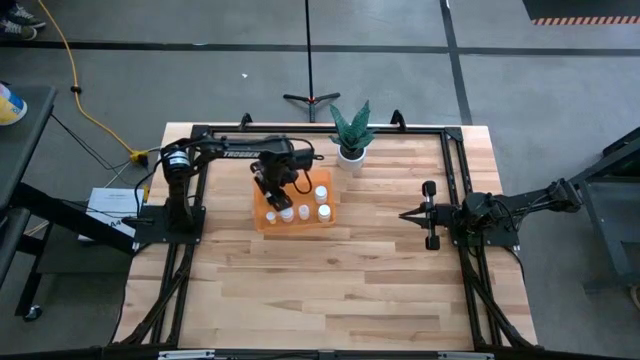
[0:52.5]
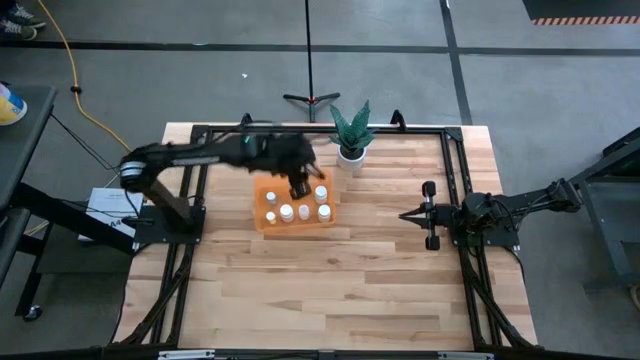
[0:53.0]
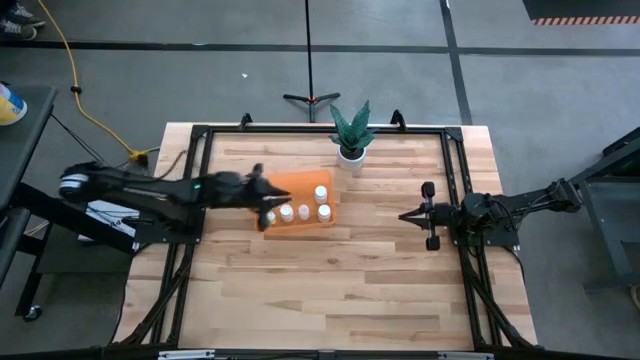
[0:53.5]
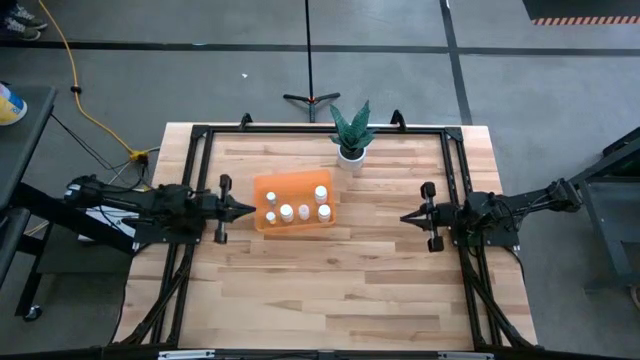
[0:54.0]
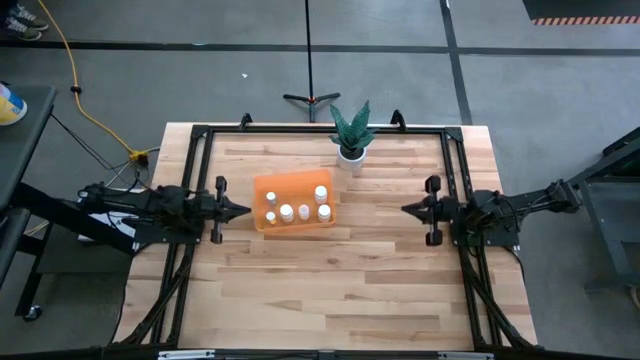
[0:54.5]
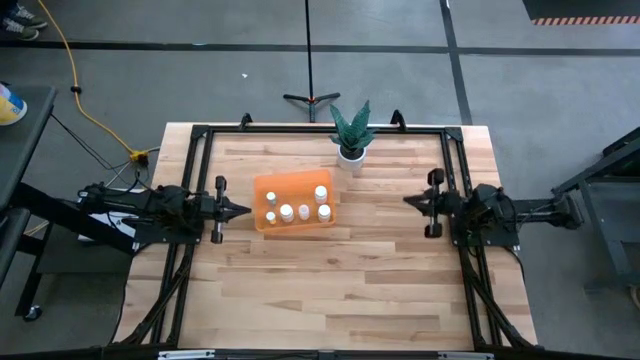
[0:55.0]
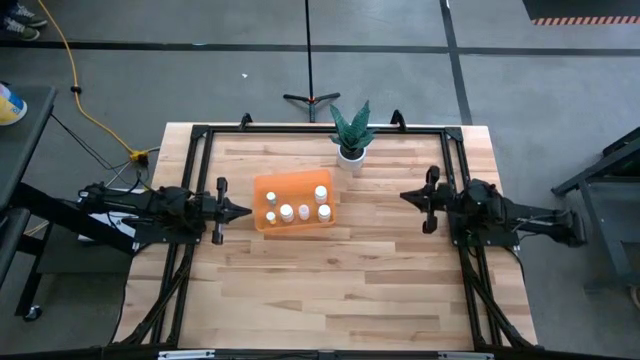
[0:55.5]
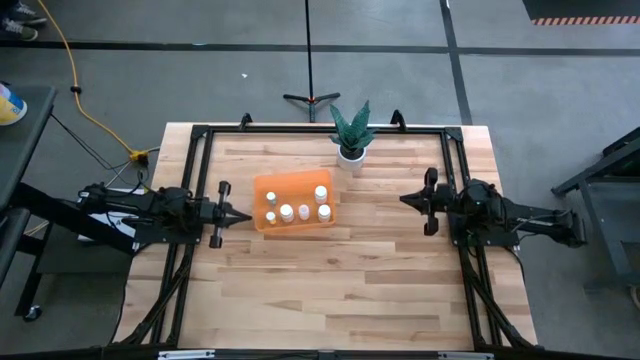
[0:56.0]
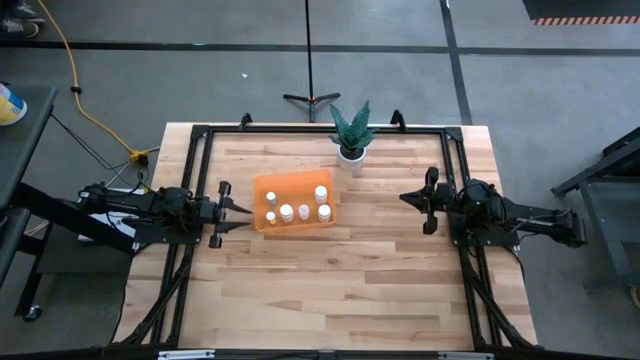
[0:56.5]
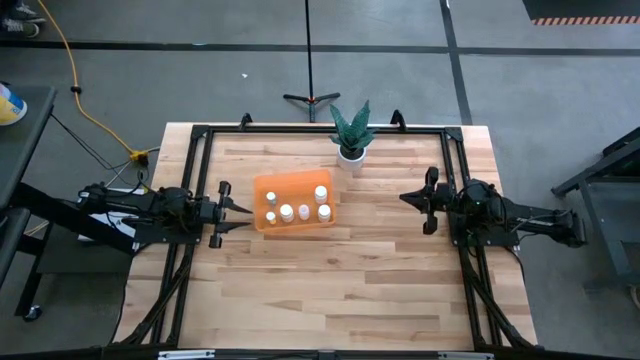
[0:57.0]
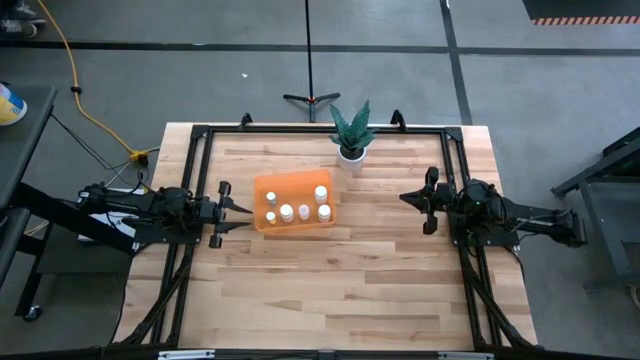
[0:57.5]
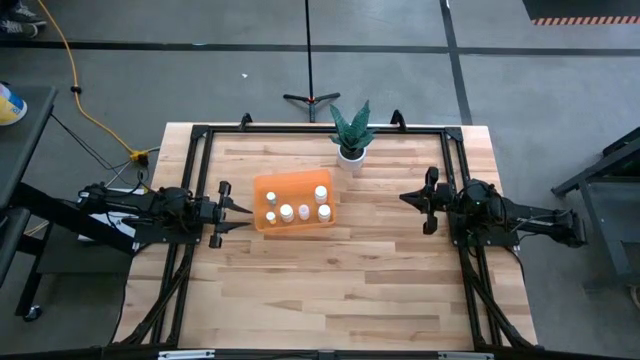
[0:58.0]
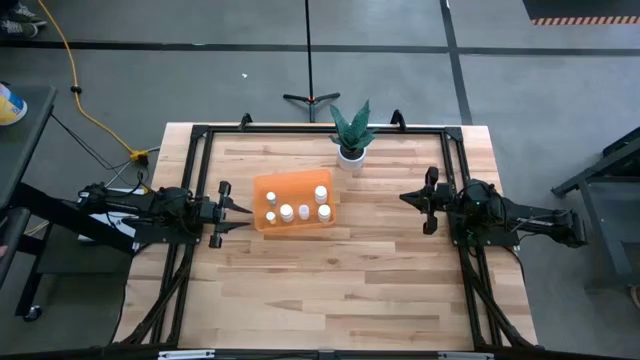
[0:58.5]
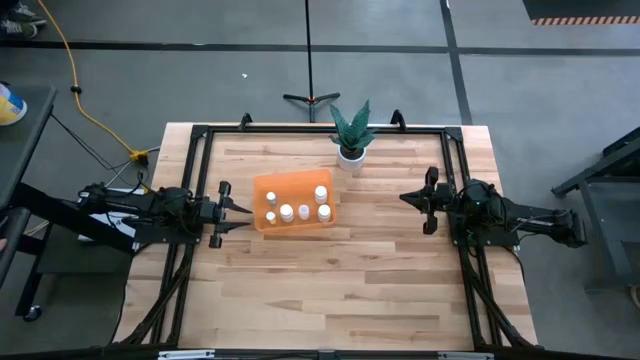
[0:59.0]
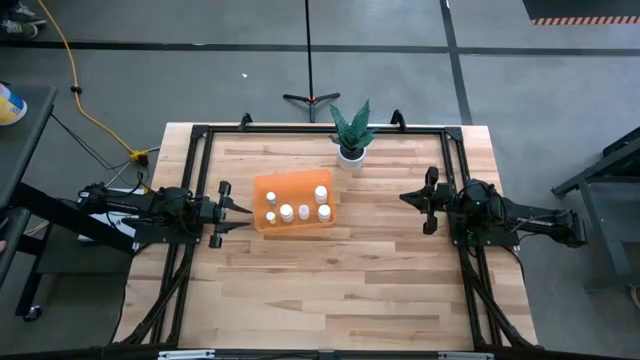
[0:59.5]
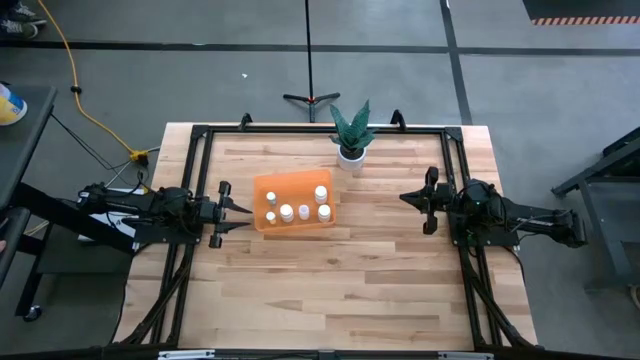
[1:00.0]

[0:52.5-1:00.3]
Task: Pick and place pill bottles into a basket
Return to Home Position

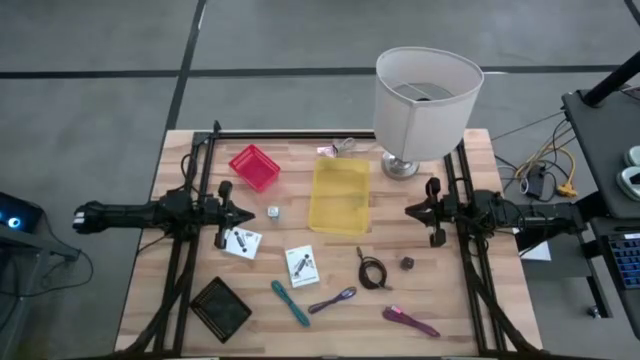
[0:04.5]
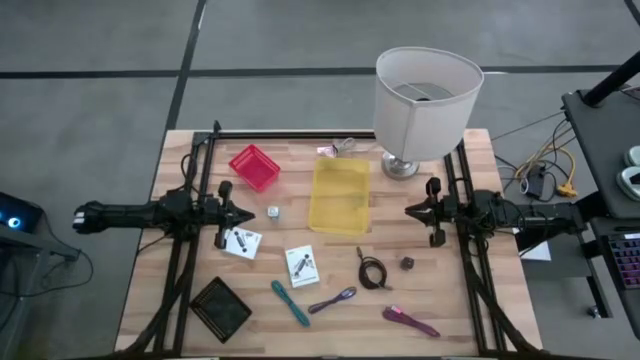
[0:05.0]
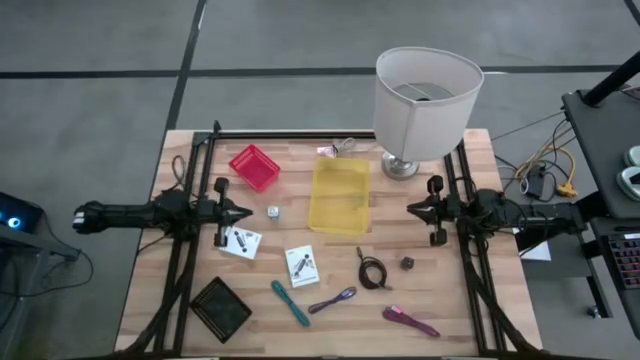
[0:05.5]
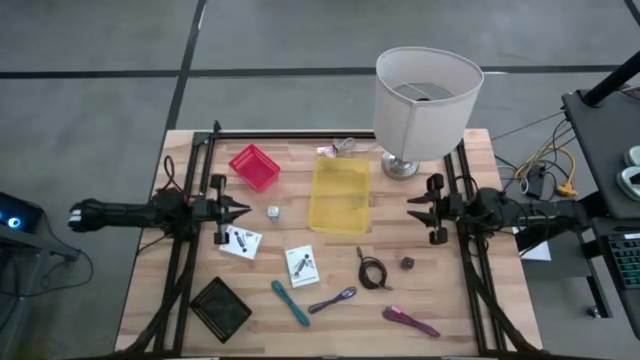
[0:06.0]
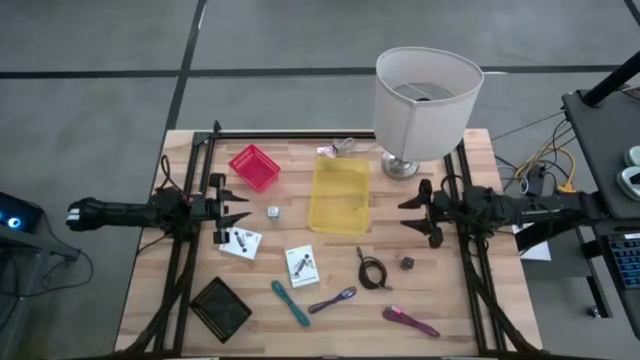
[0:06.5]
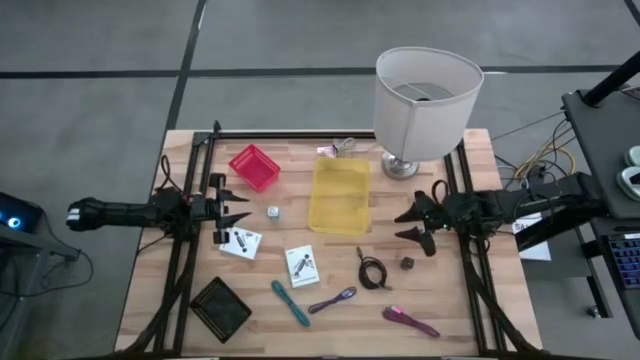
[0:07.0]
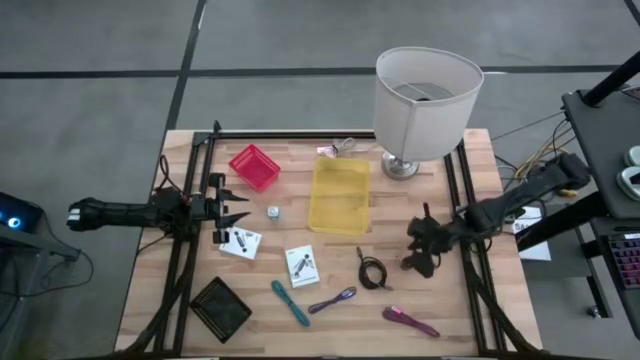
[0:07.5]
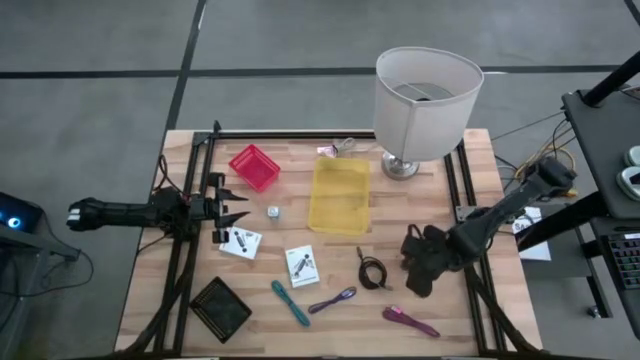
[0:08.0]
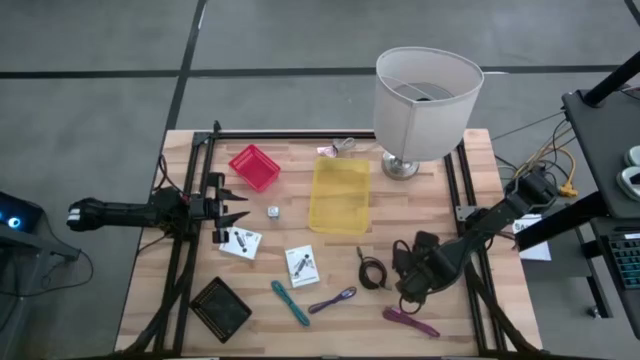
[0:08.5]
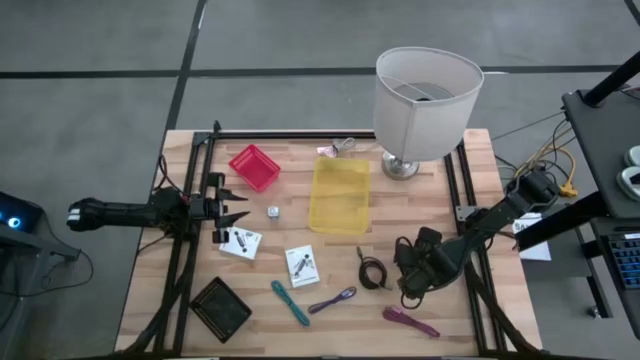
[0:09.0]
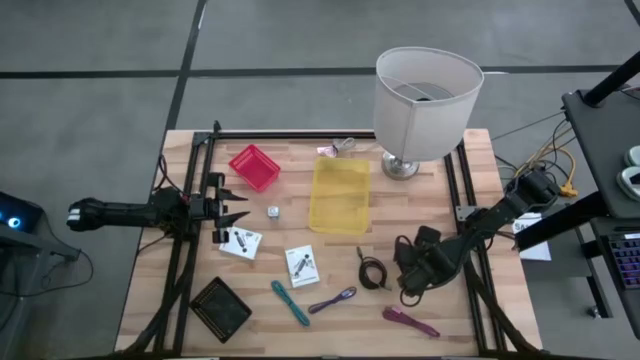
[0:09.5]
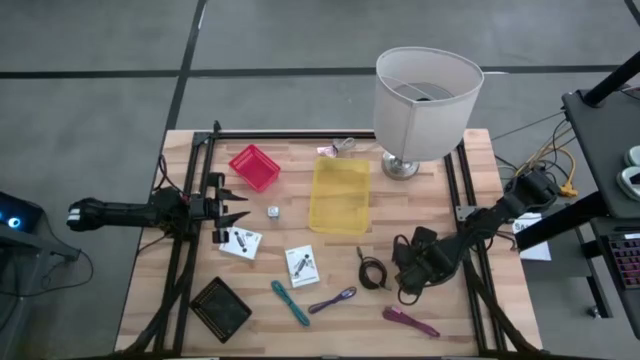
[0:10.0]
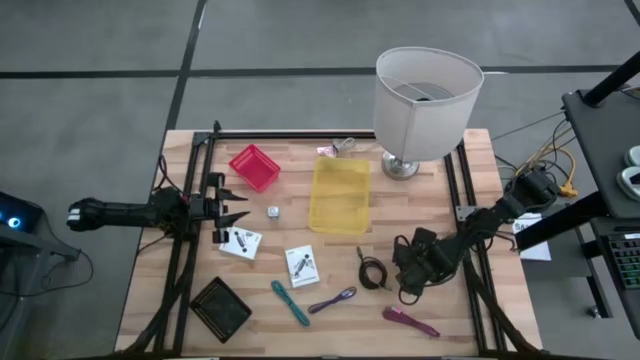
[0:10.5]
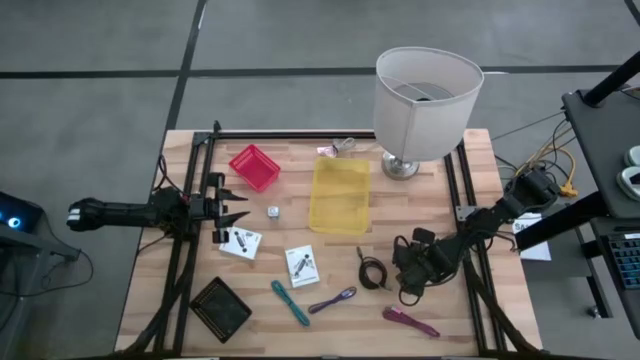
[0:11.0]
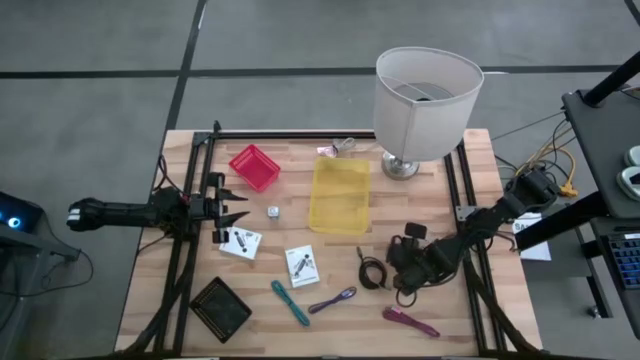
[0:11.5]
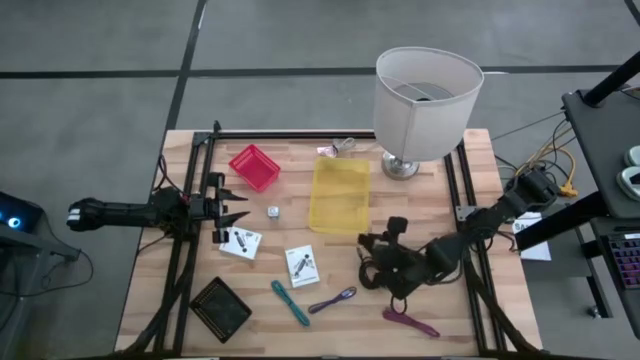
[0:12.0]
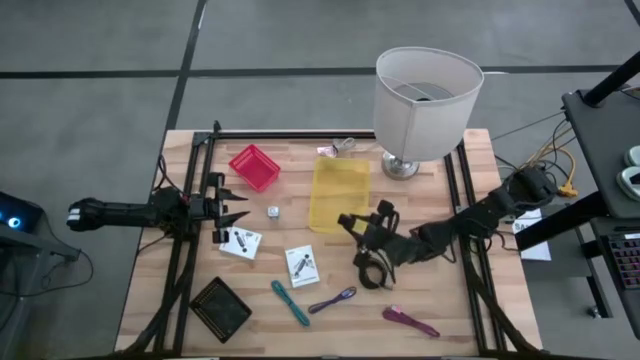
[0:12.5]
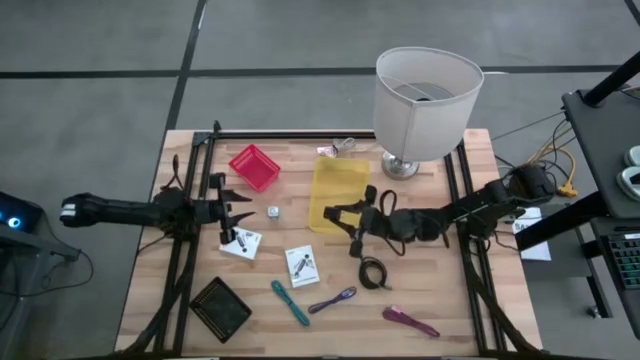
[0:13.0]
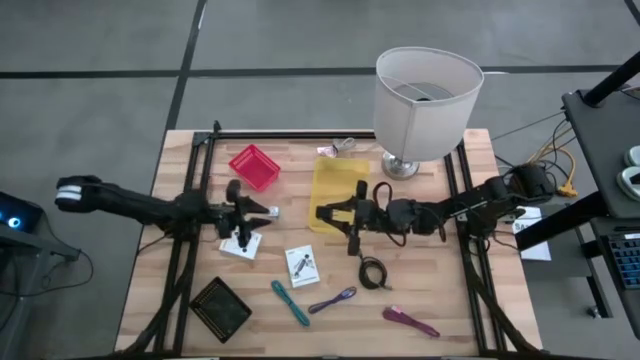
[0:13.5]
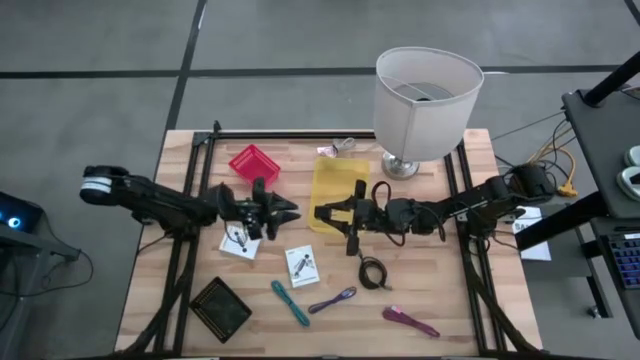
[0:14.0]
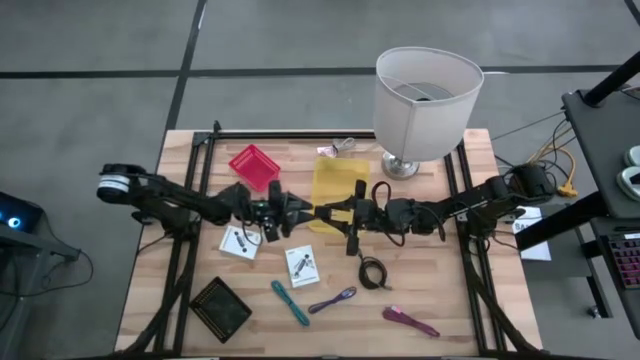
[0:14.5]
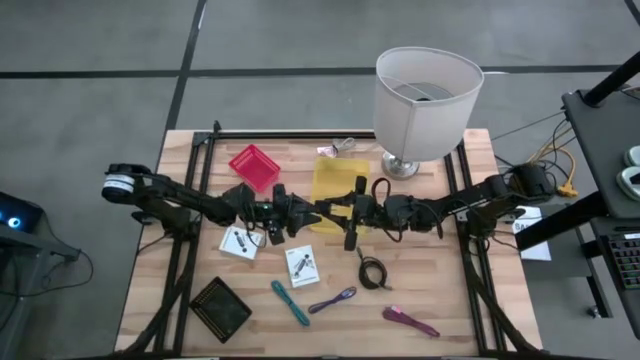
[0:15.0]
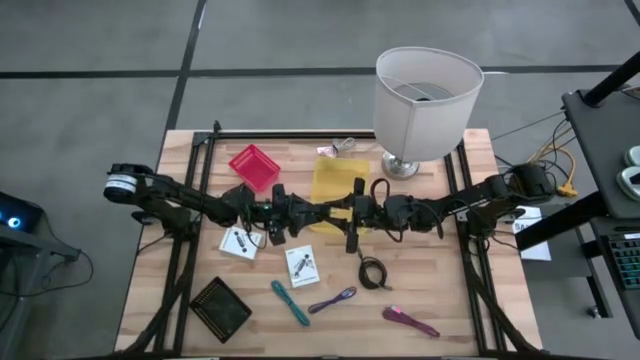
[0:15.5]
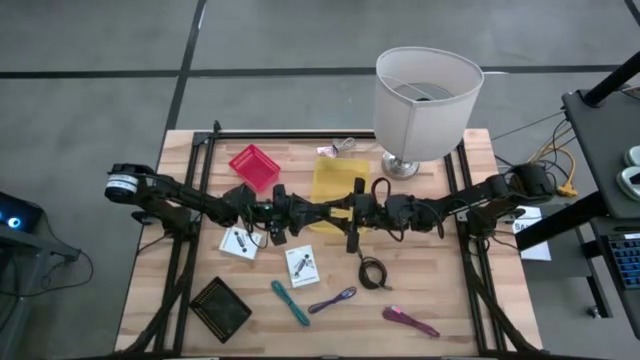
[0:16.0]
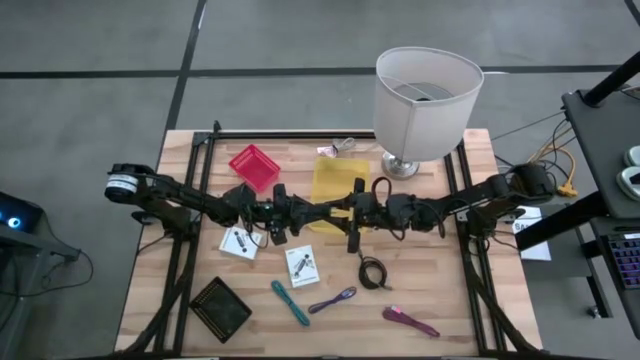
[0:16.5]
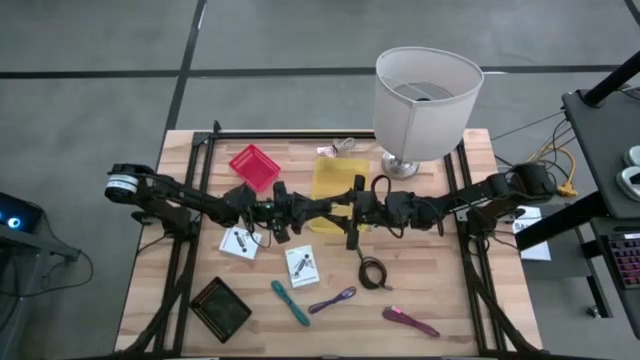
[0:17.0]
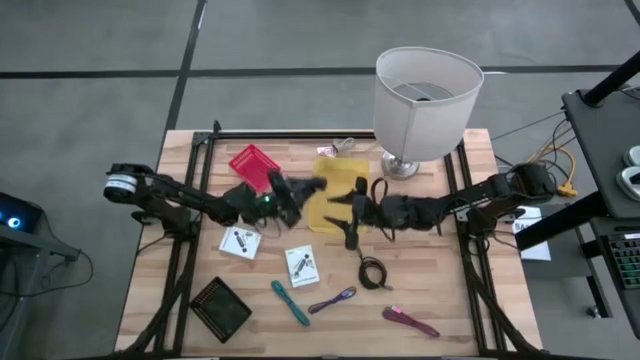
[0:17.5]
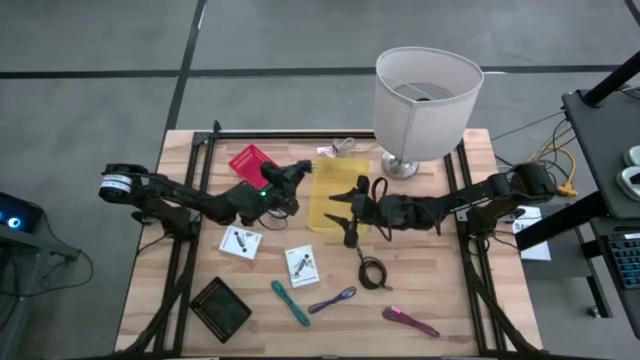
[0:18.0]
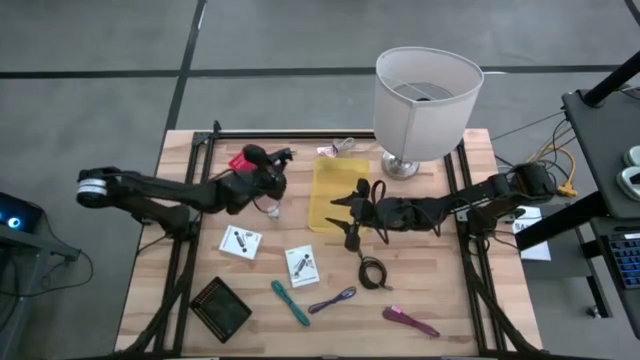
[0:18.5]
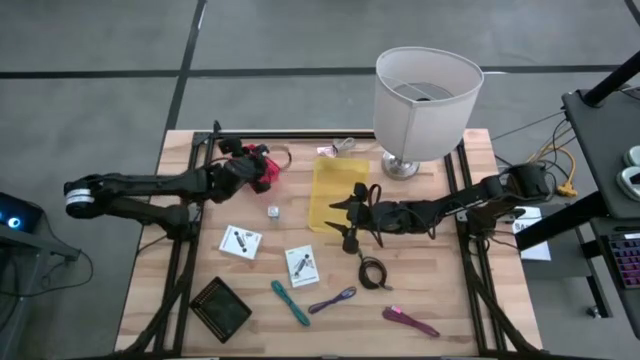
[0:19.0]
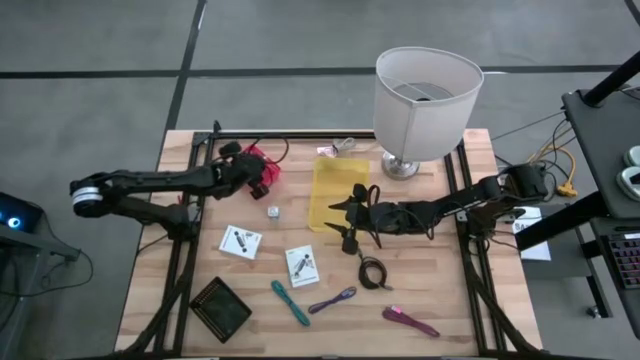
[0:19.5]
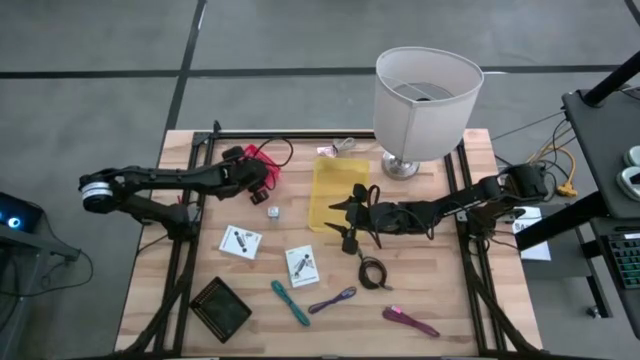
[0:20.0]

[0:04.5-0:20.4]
Task: Pick and place items into bin
Put the black charger adapter into the red bin
